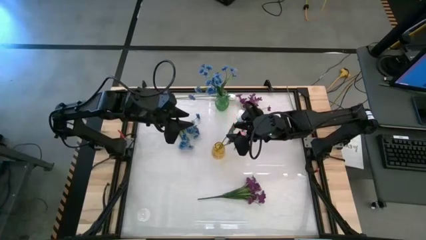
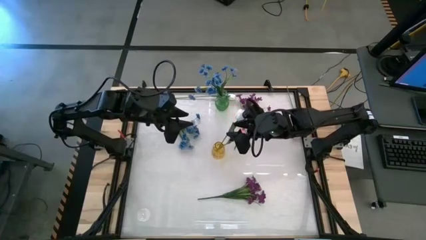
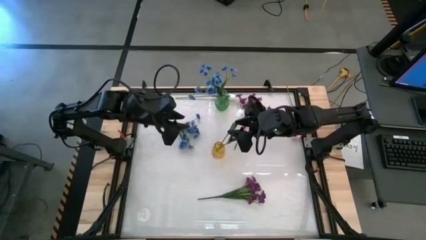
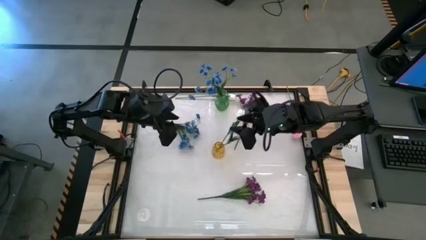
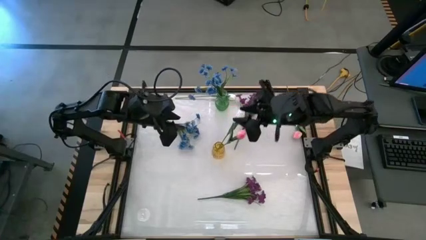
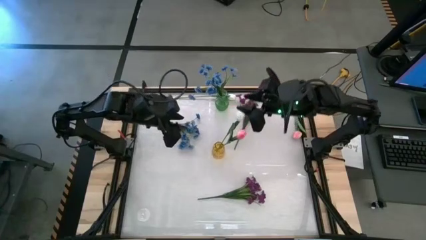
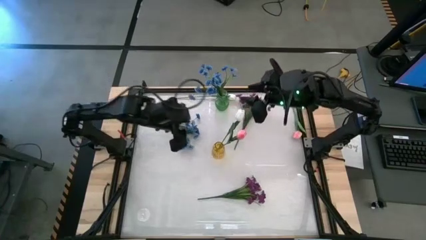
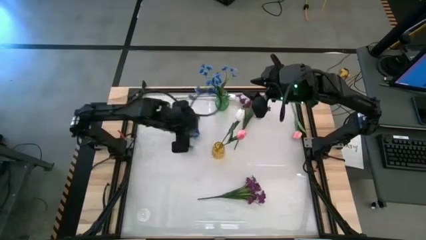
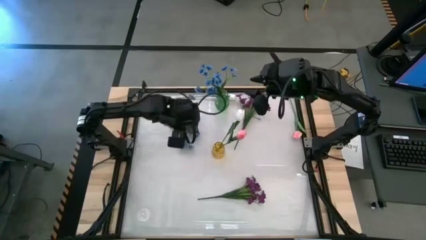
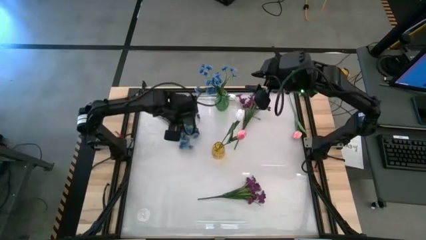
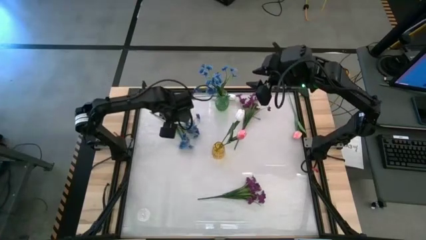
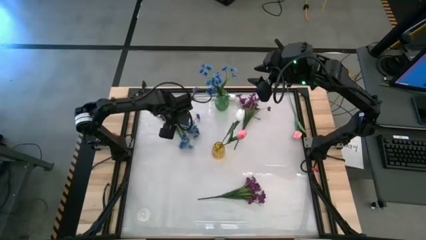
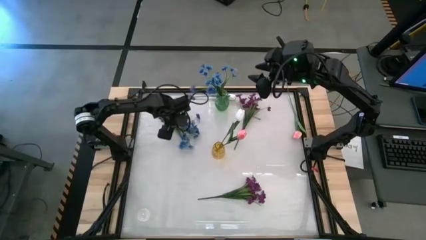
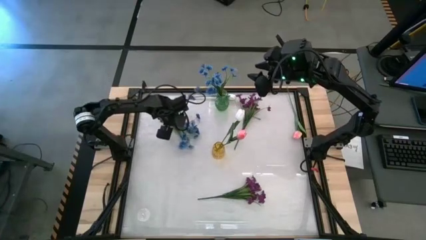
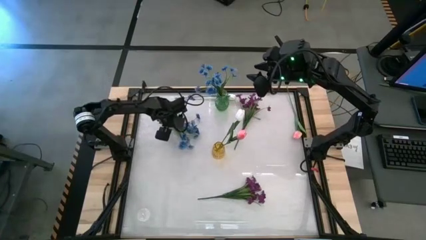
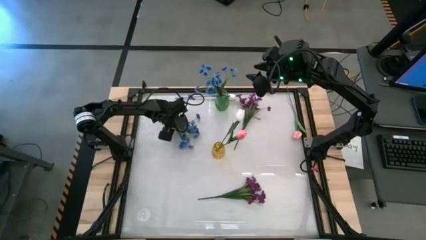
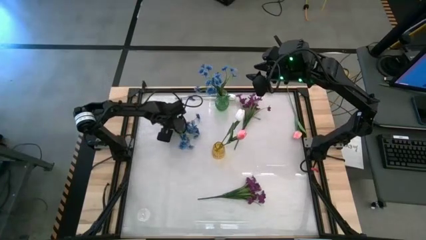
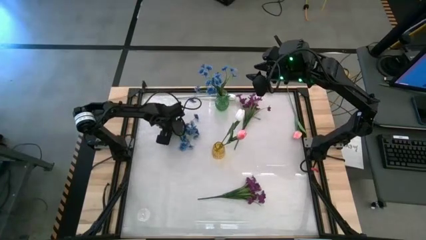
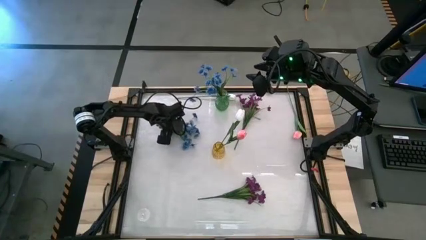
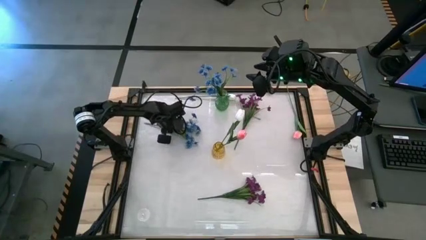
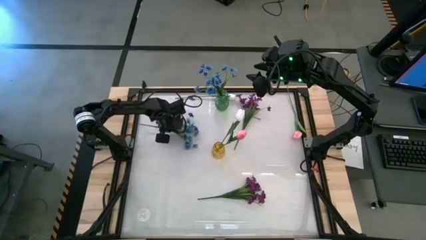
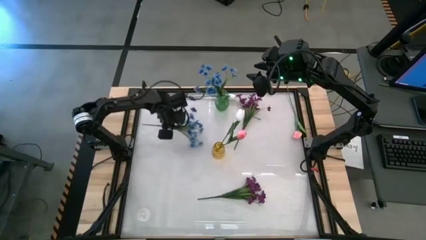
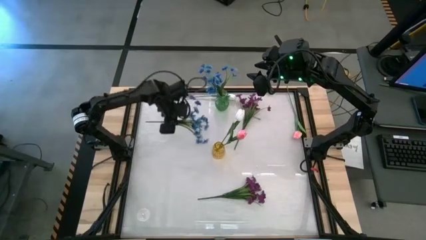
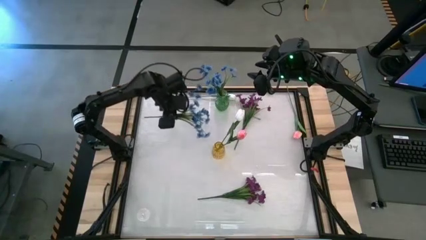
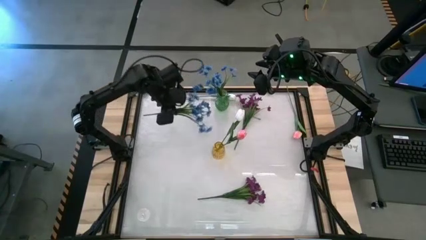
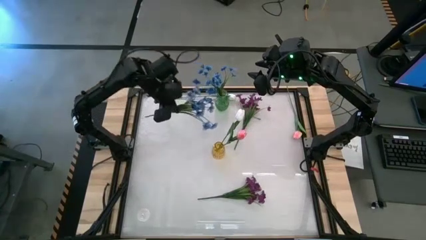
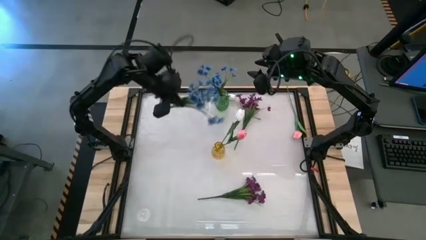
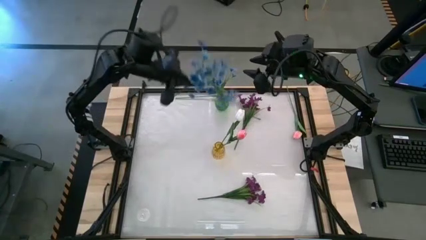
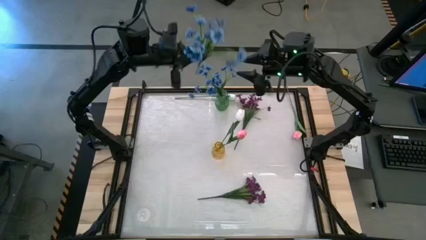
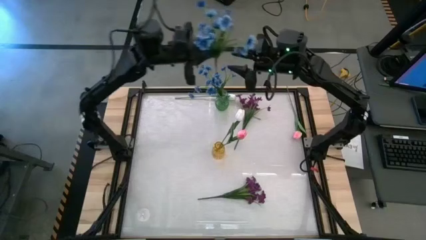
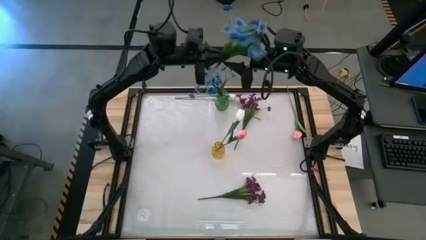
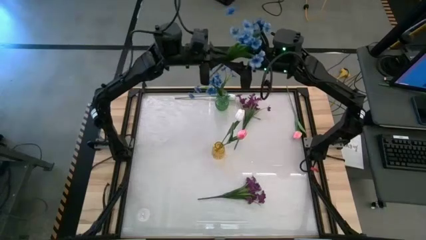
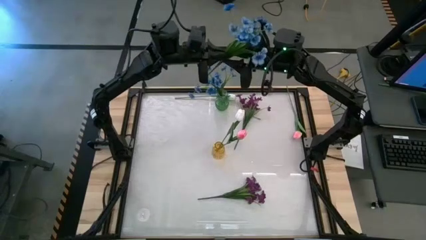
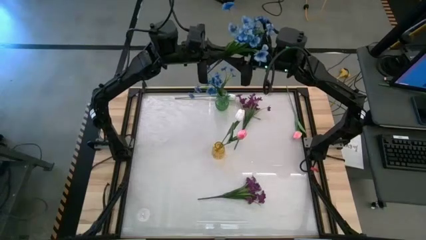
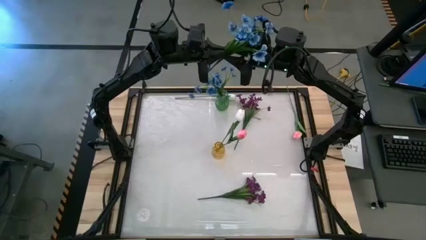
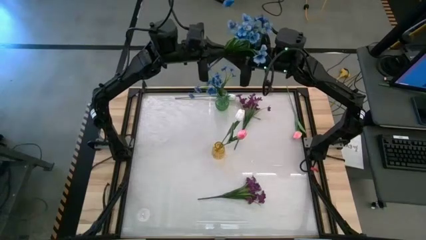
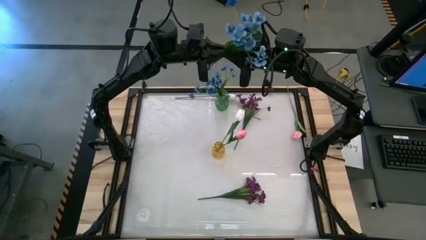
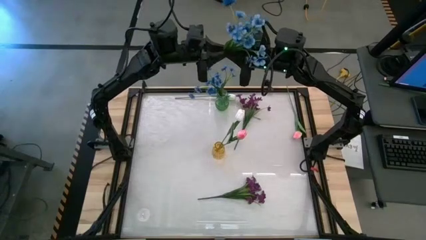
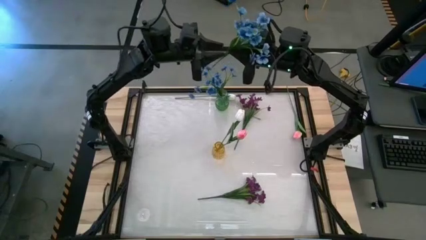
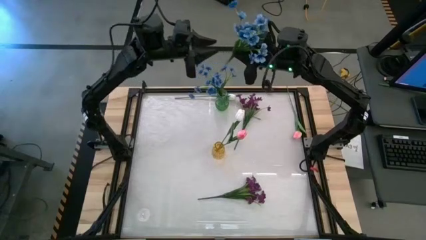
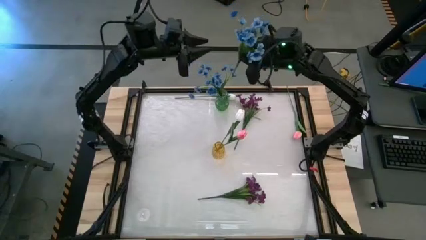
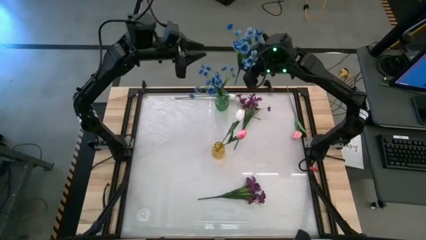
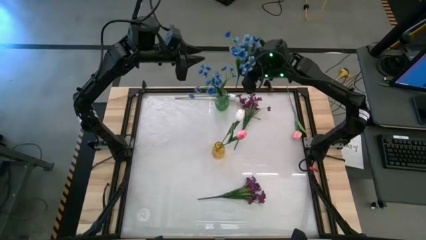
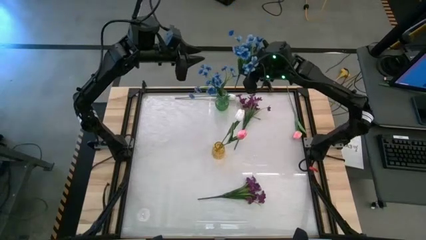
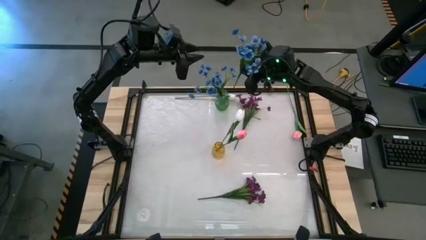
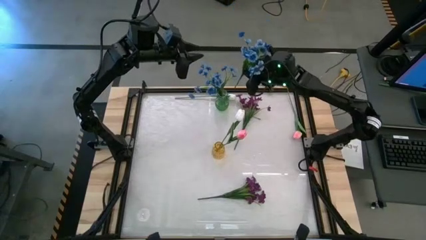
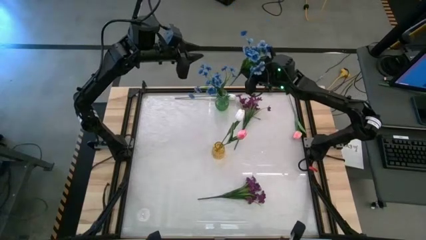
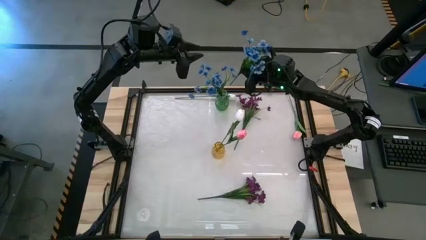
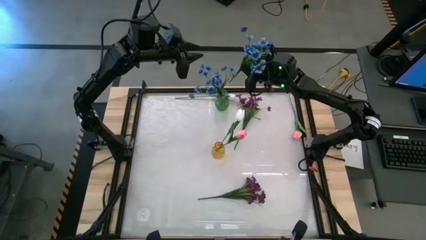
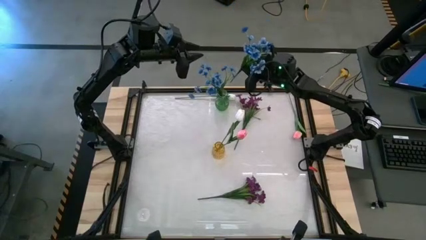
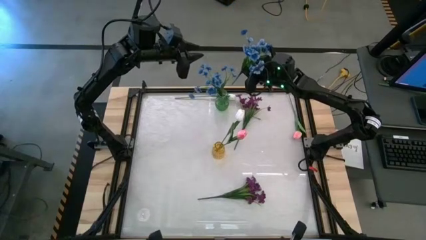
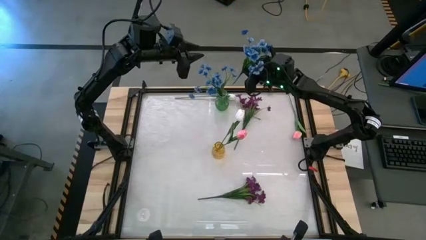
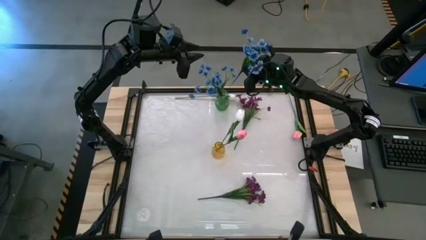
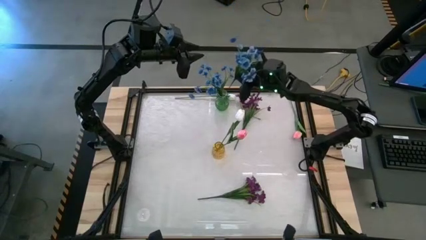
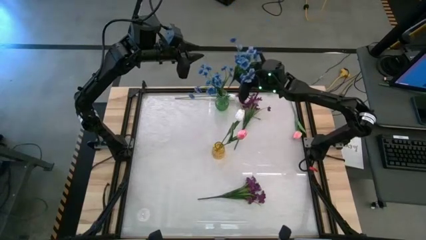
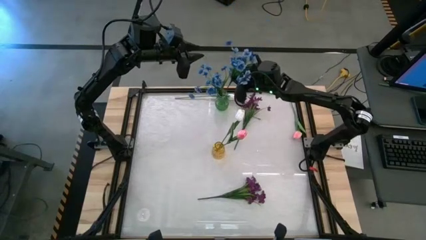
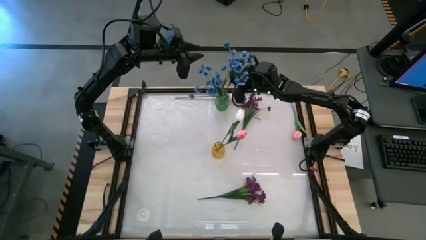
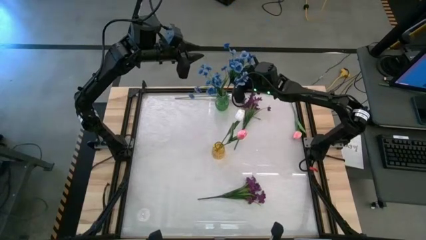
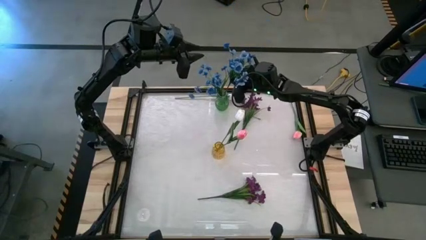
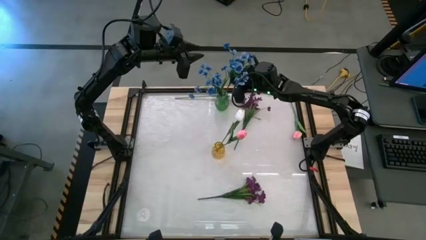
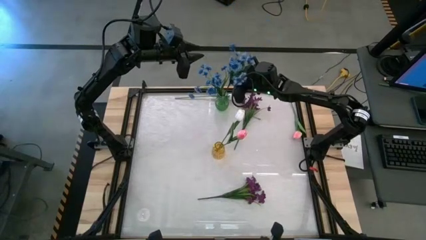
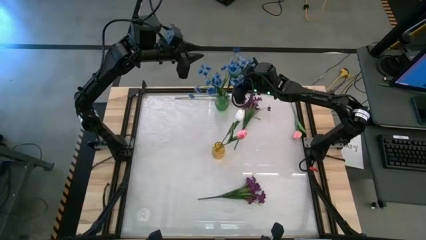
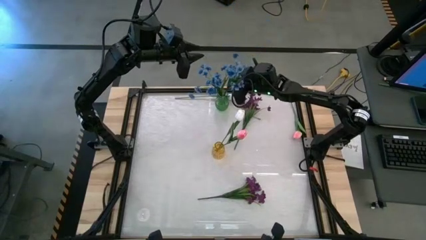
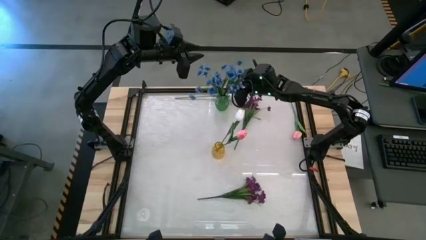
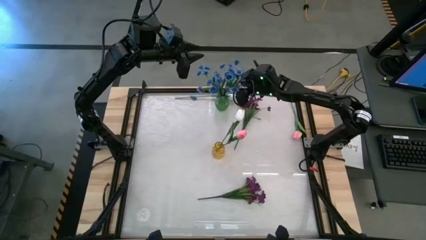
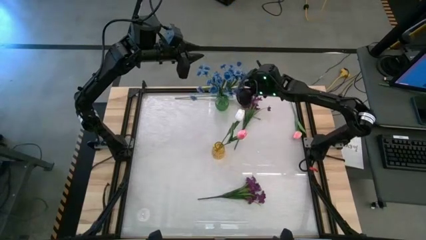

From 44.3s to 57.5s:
Task: Sort flowers into vase by color
Put the blue flowers into the green vase
